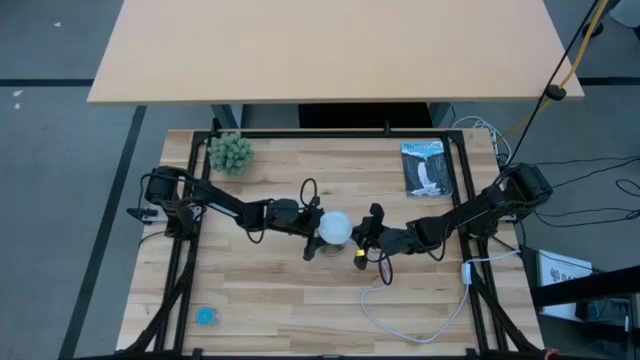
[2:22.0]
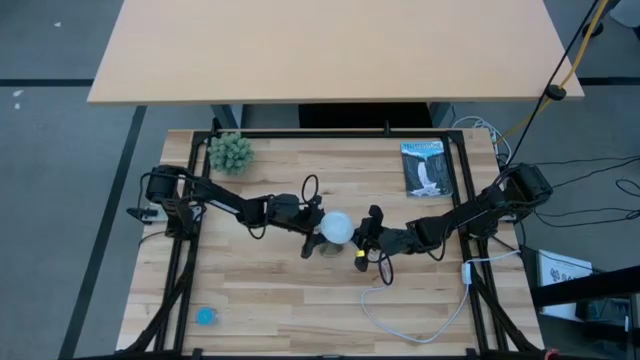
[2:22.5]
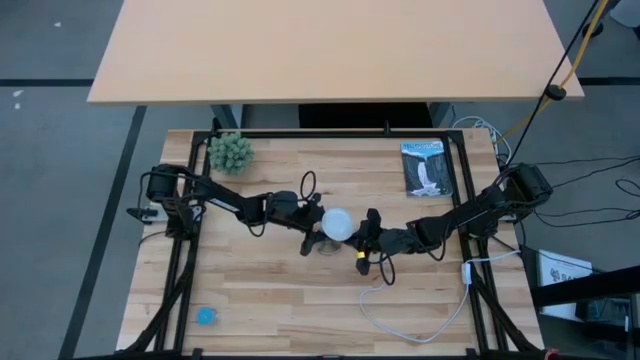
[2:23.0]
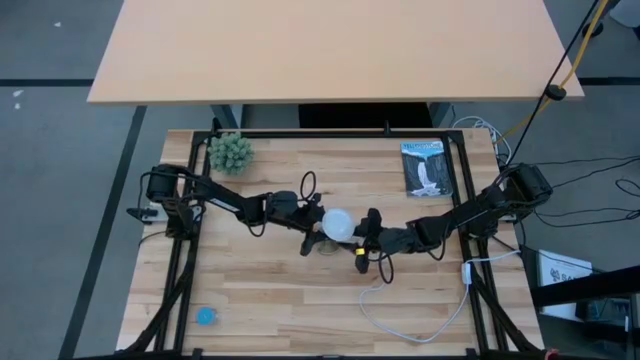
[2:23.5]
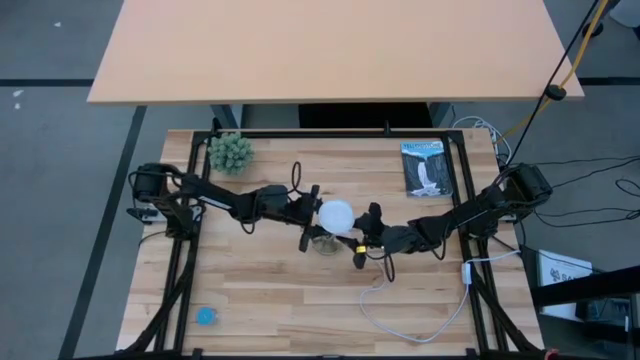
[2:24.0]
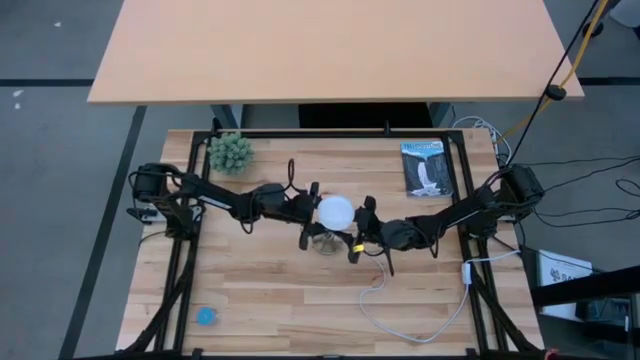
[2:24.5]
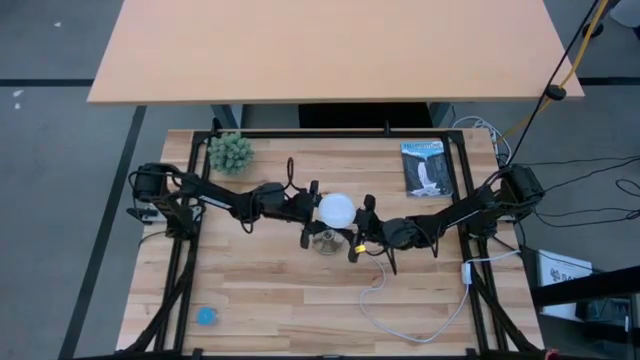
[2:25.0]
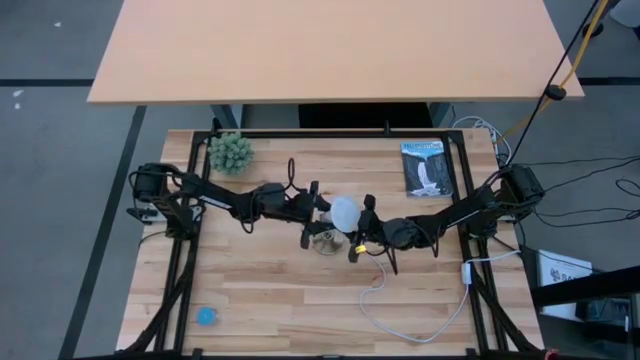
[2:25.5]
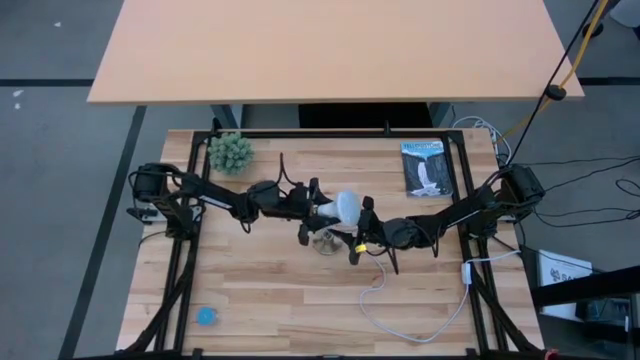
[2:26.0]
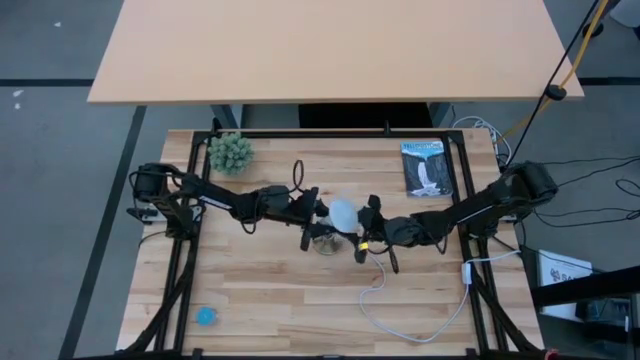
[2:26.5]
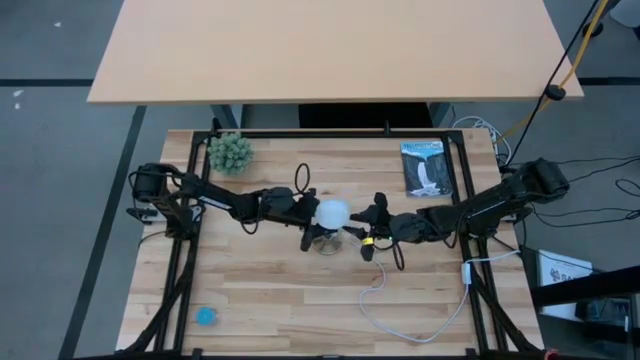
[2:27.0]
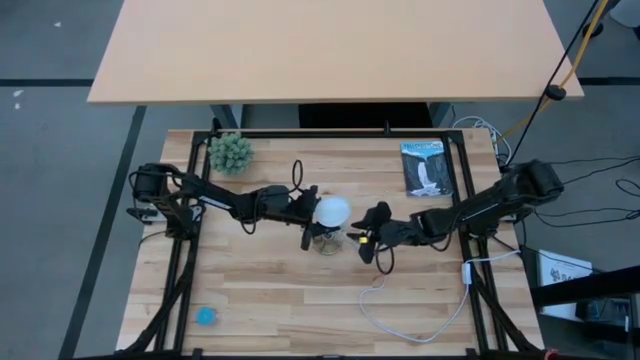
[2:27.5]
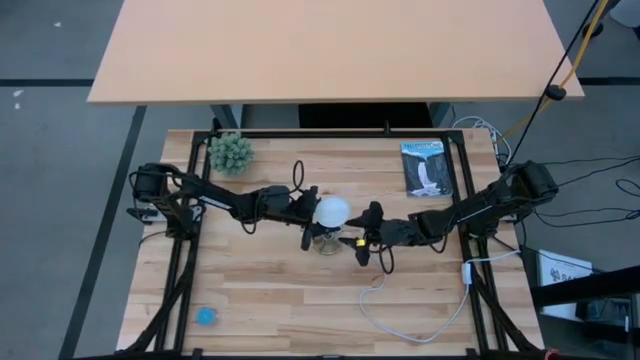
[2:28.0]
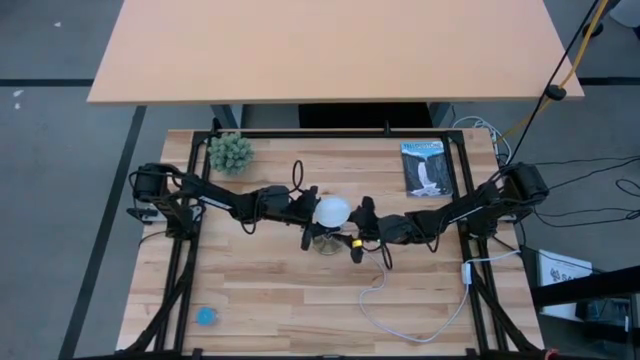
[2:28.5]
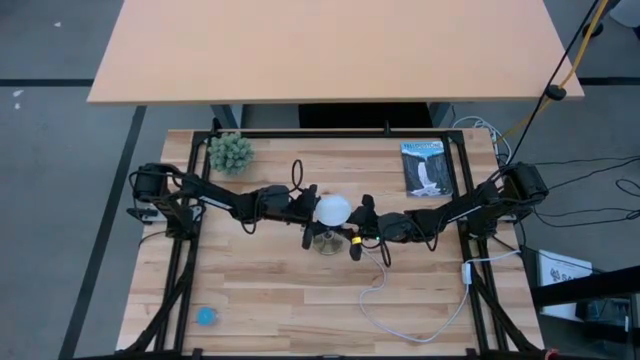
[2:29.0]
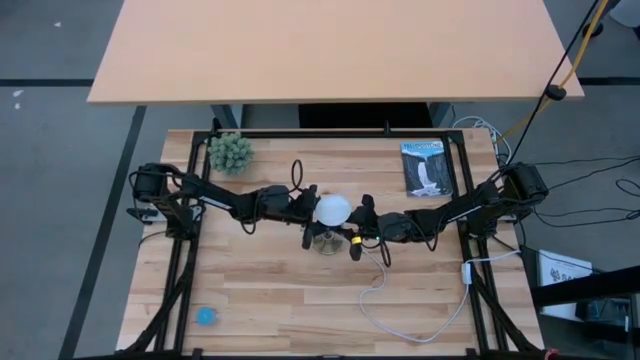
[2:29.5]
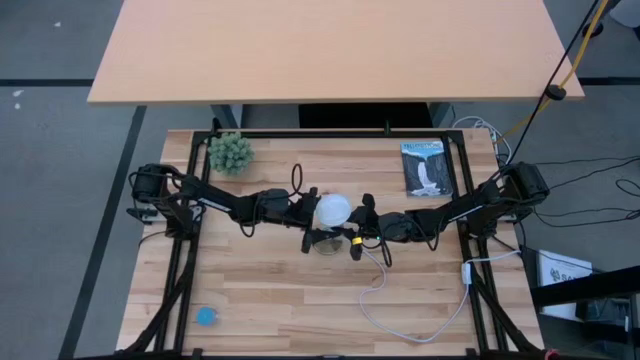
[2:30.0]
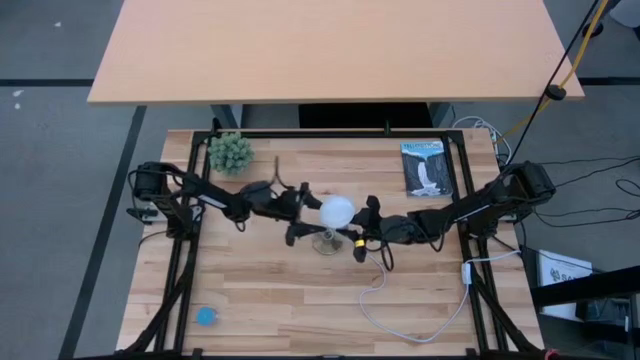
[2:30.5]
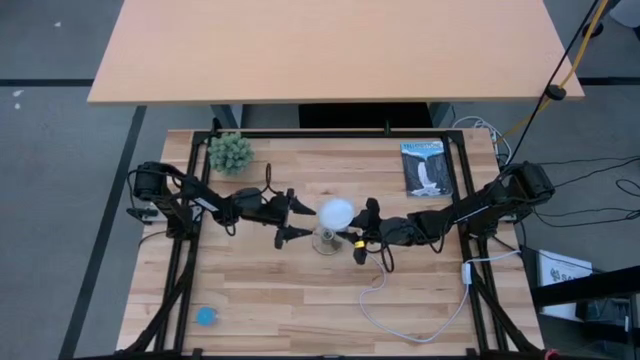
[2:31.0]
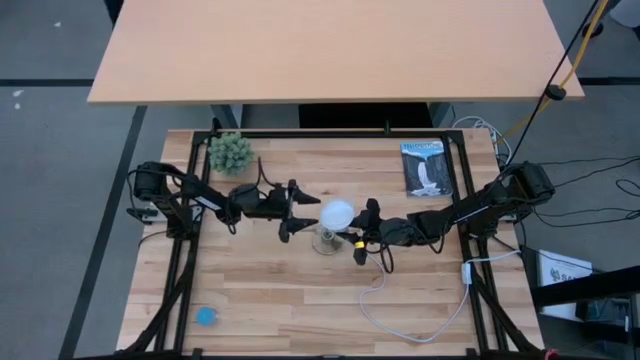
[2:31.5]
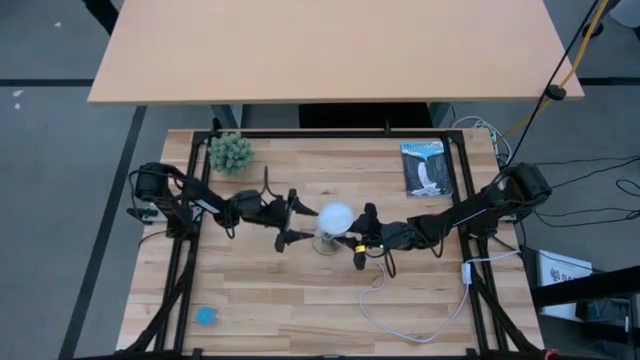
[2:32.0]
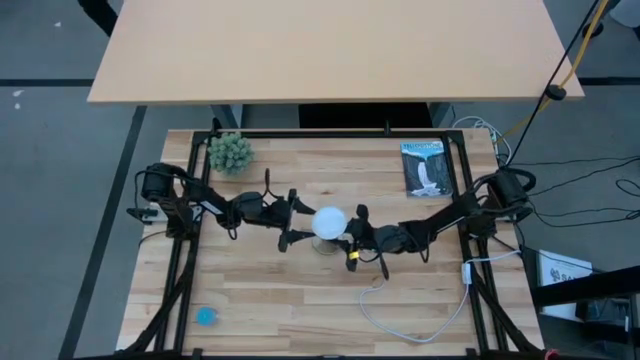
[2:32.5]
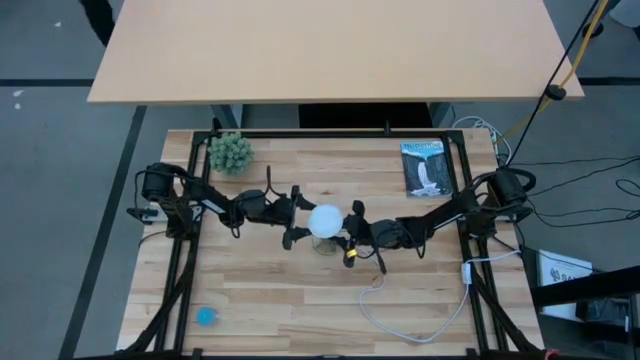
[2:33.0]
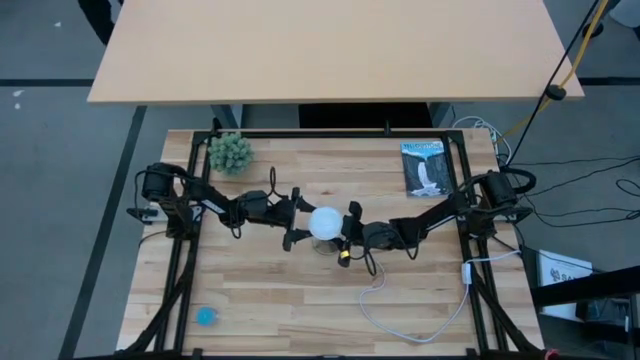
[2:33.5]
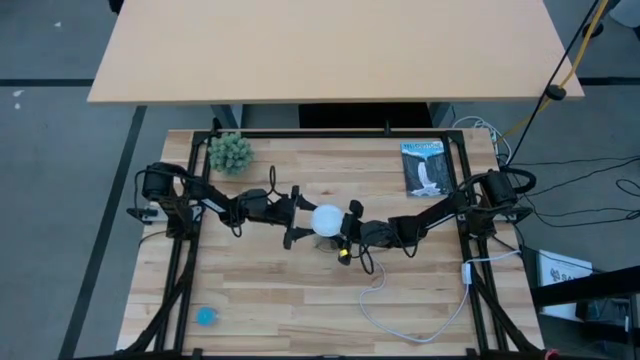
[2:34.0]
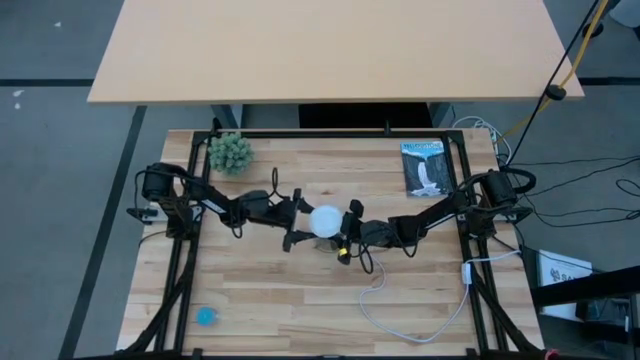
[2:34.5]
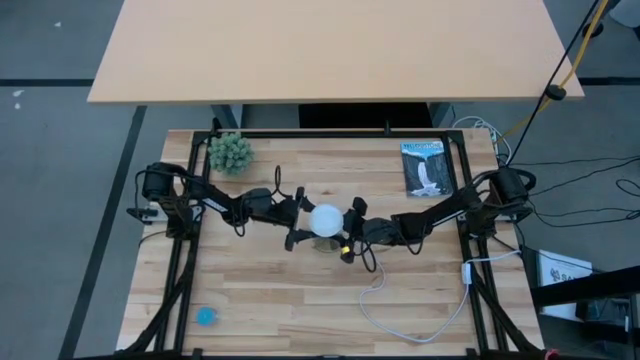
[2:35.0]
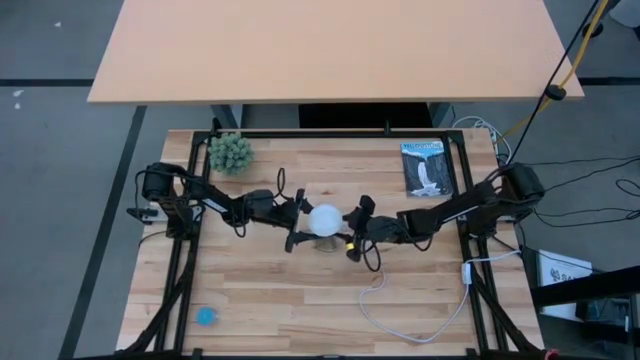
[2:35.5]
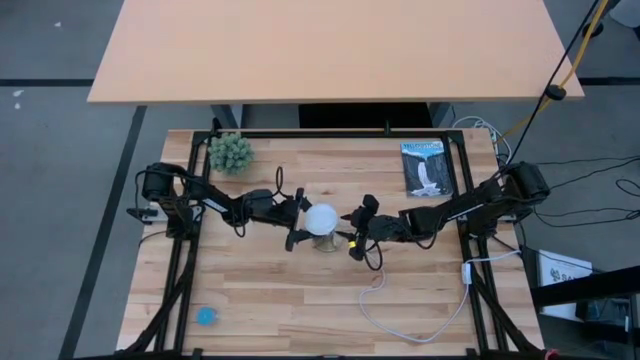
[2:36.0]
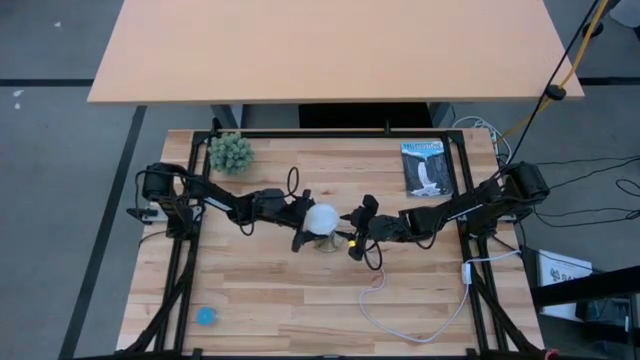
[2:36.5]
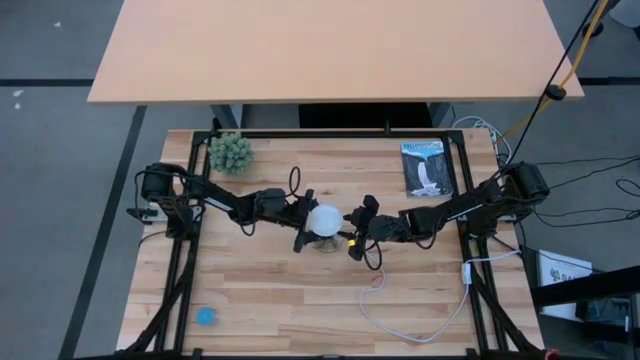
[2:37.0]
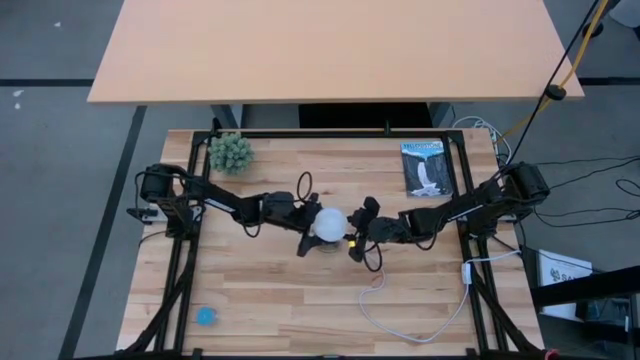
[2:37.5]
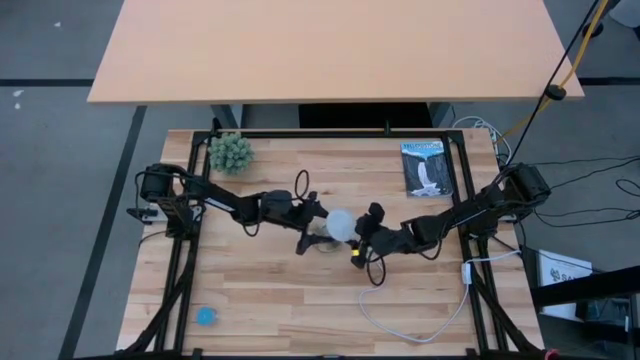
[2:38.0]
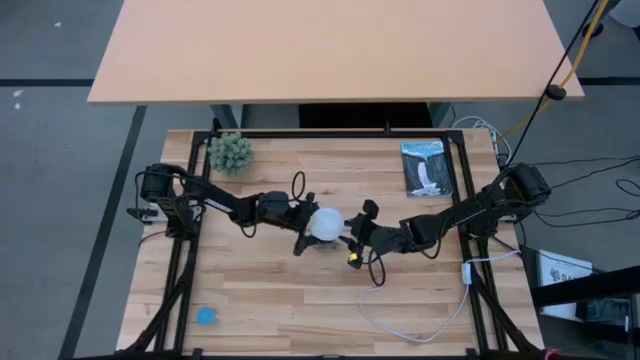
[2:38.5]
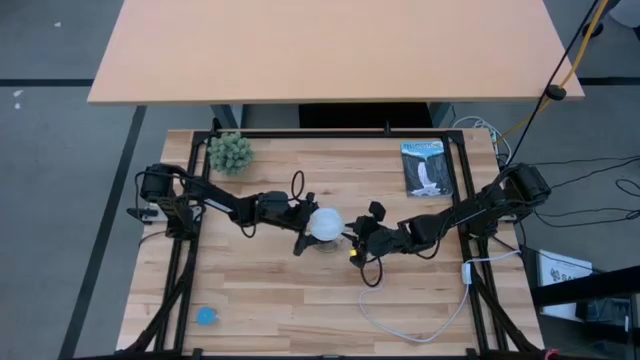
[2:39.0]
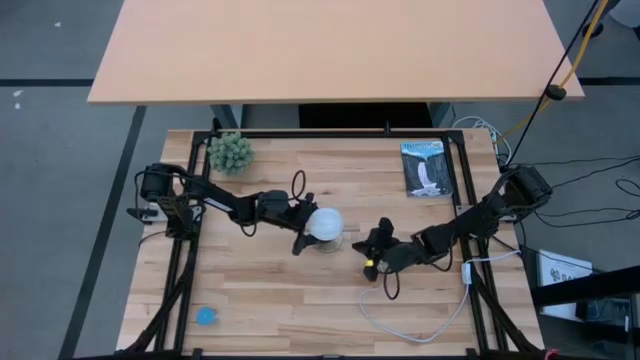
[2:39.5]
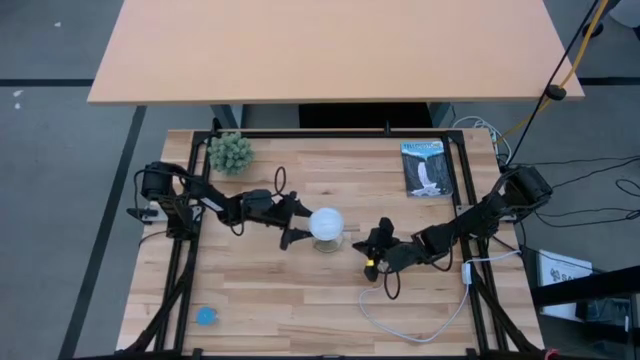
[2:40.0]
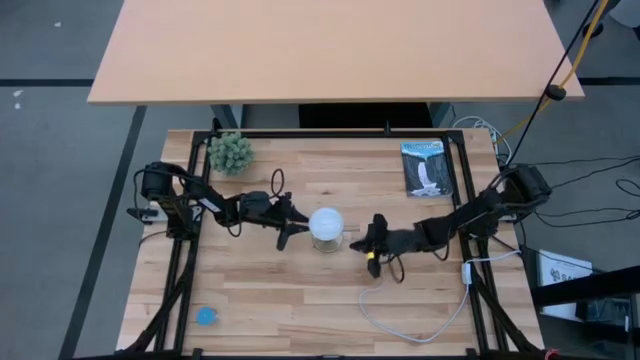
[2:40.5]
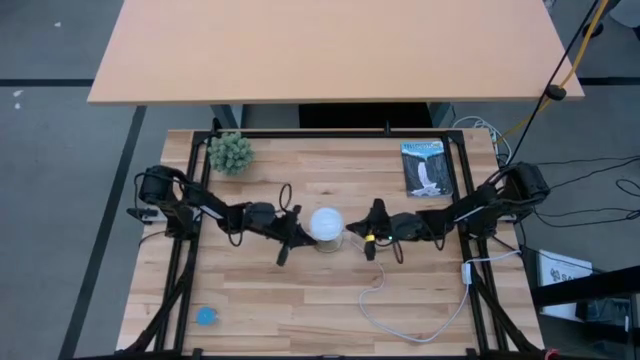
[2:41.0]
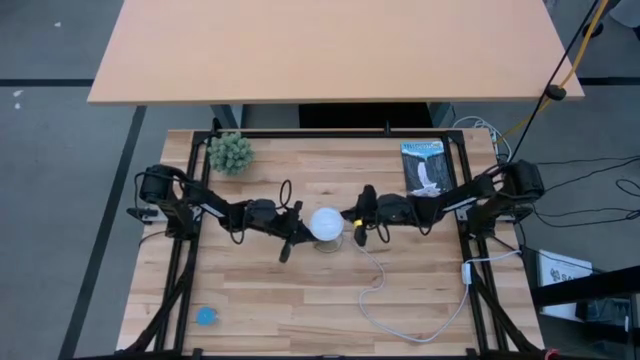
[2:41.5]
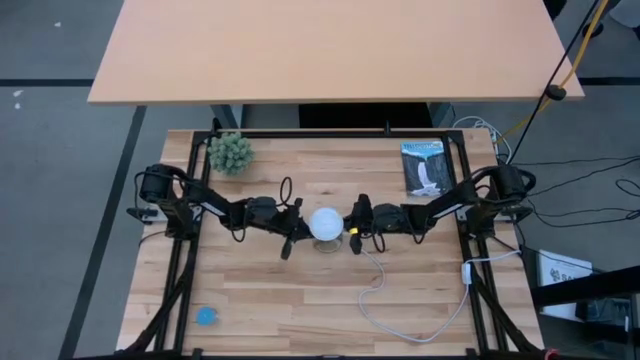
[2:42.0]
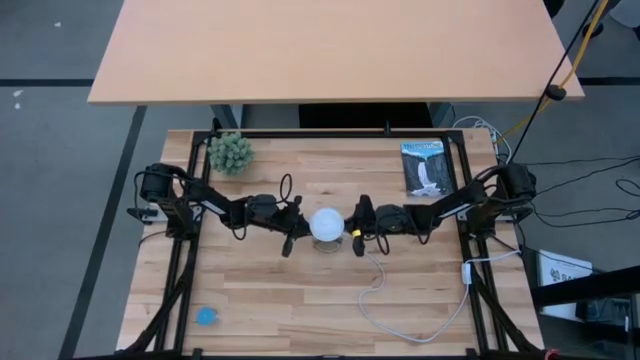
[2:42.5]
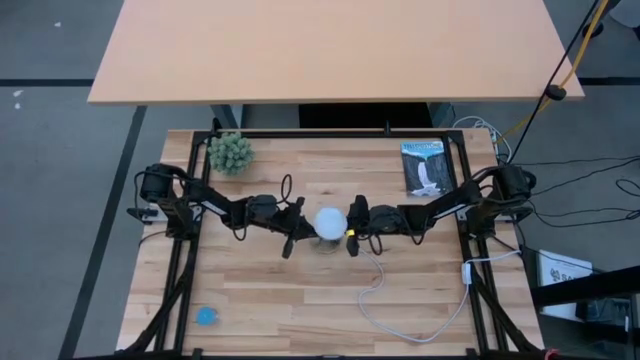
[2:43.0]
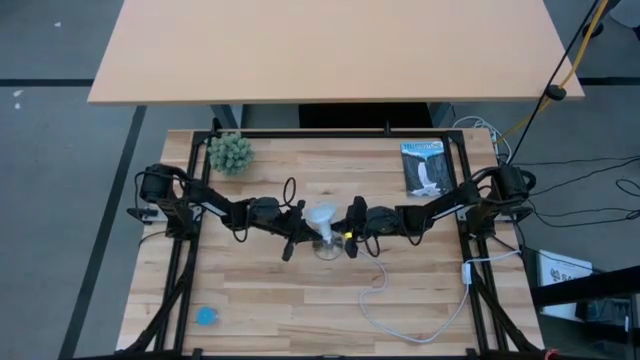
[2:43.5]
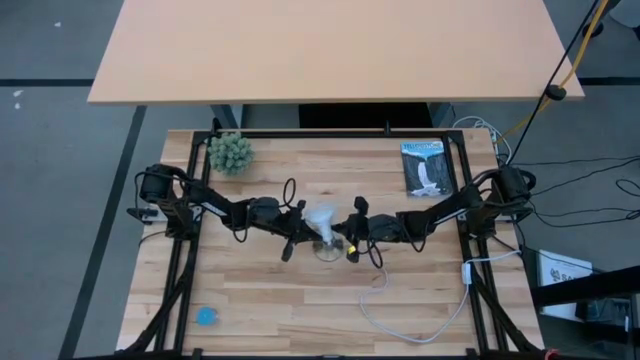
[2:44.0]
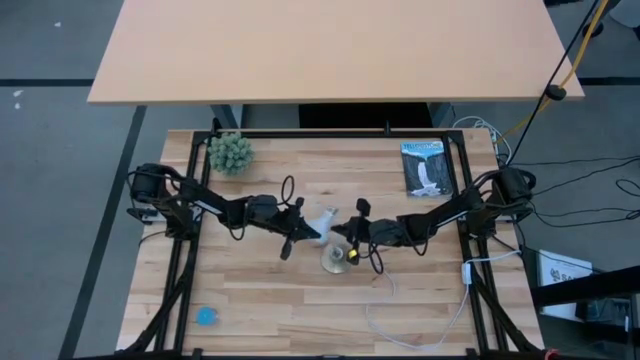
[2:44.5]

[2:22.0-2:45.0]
Task: Screw lightbulb
Insert the white light bulb into the gold lamp
